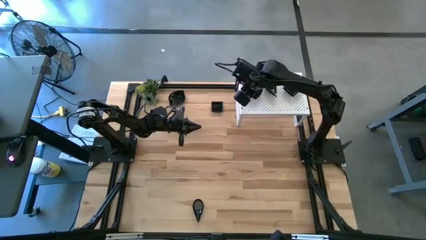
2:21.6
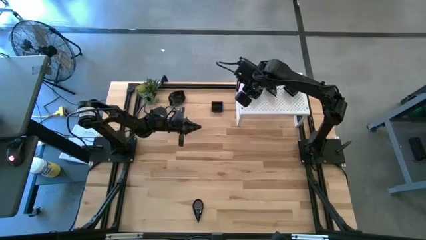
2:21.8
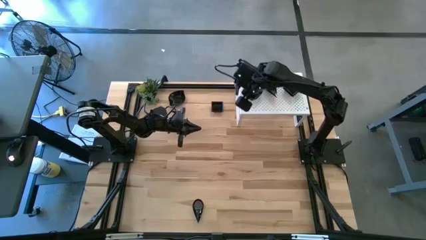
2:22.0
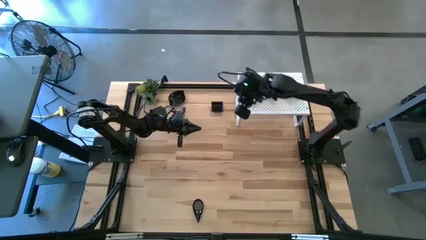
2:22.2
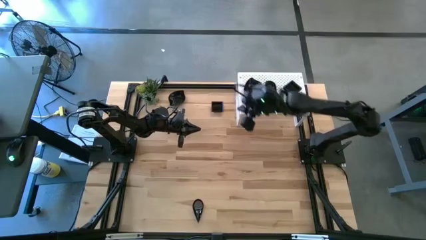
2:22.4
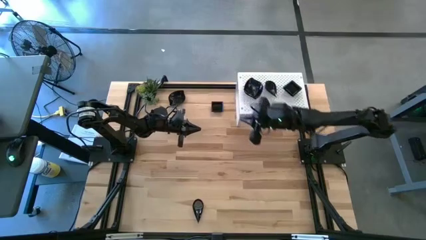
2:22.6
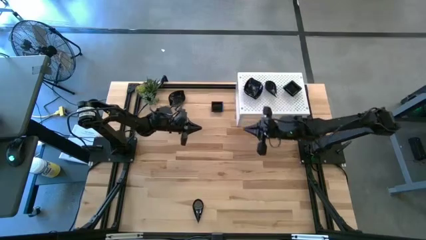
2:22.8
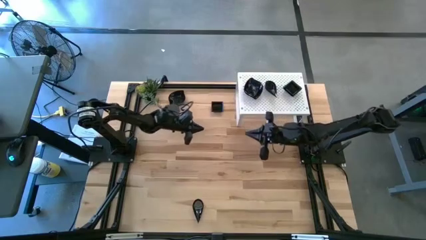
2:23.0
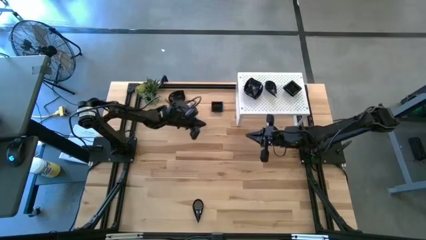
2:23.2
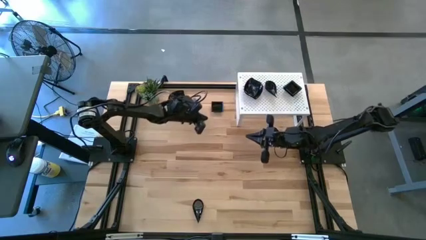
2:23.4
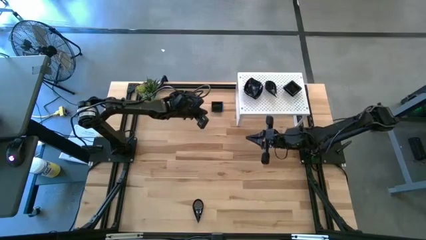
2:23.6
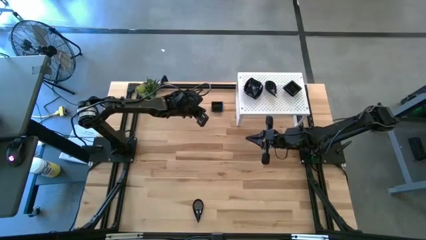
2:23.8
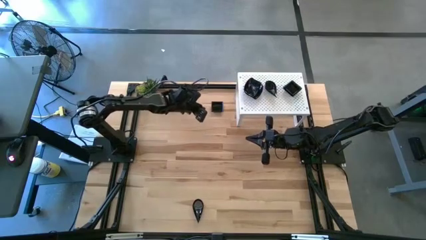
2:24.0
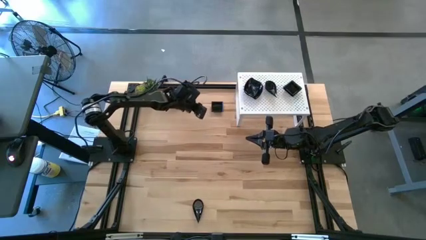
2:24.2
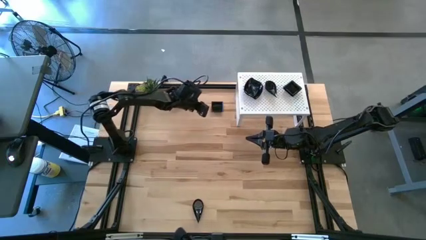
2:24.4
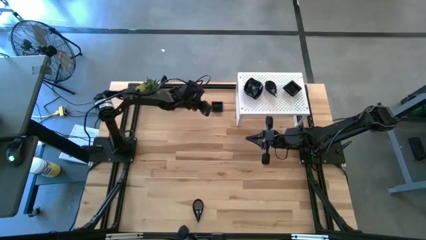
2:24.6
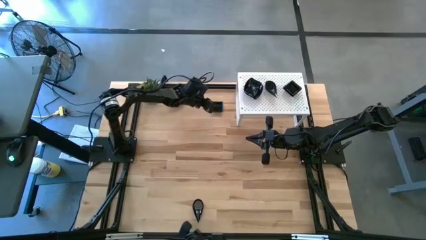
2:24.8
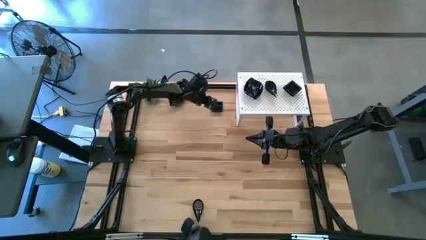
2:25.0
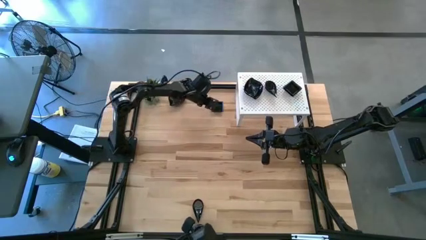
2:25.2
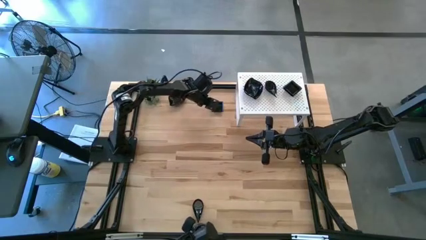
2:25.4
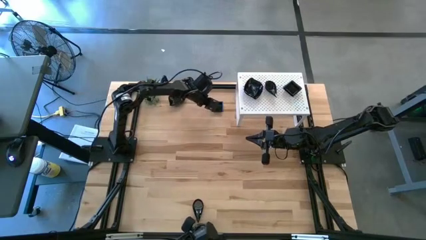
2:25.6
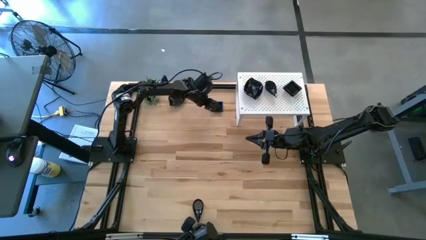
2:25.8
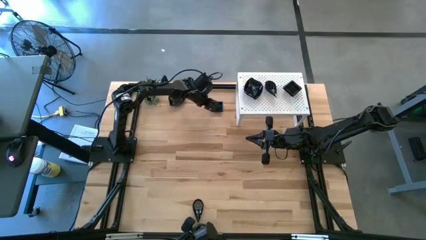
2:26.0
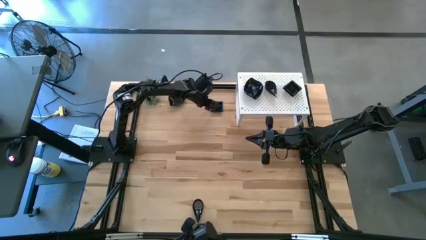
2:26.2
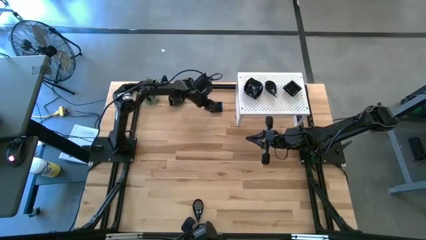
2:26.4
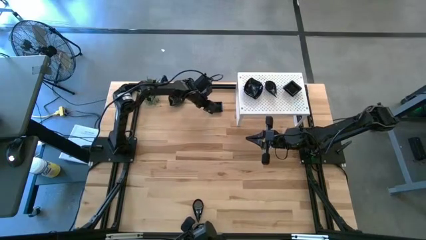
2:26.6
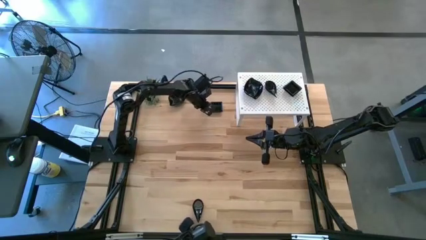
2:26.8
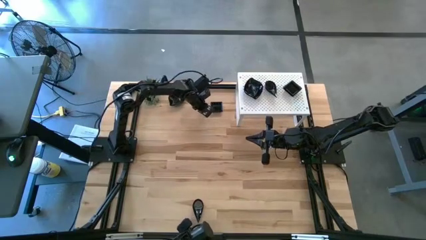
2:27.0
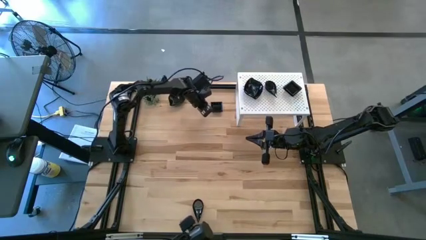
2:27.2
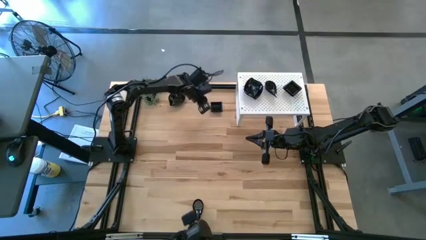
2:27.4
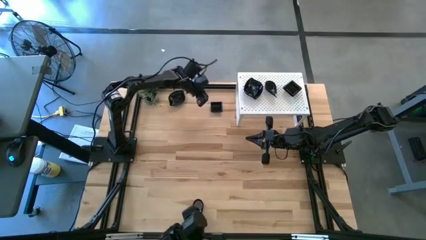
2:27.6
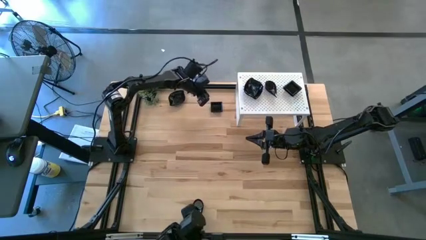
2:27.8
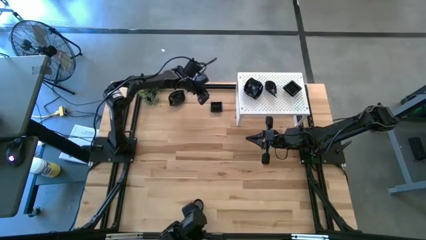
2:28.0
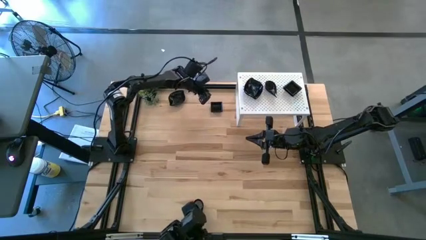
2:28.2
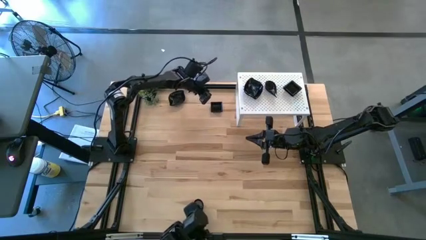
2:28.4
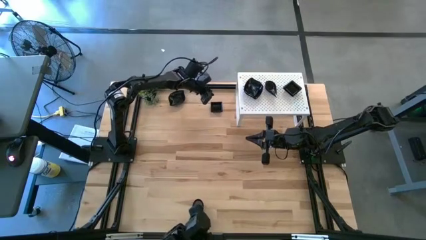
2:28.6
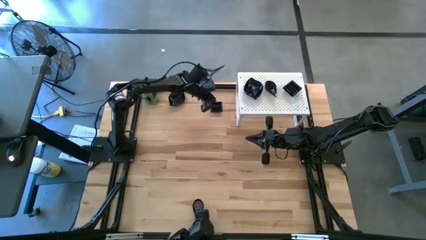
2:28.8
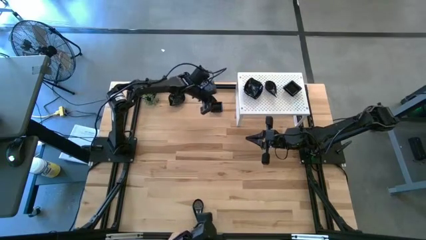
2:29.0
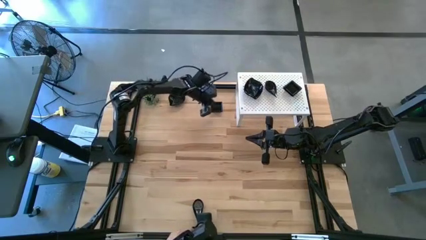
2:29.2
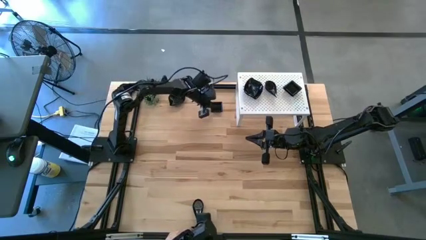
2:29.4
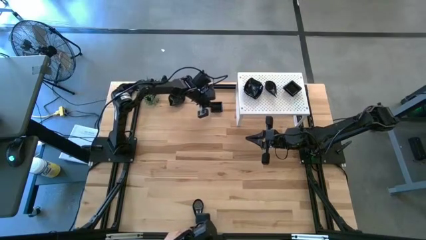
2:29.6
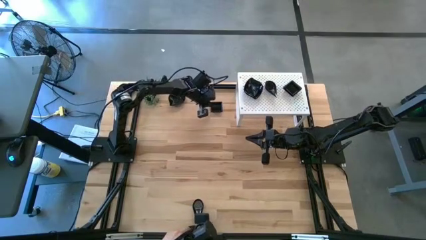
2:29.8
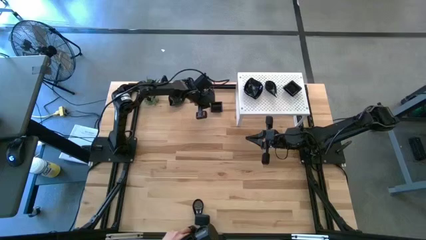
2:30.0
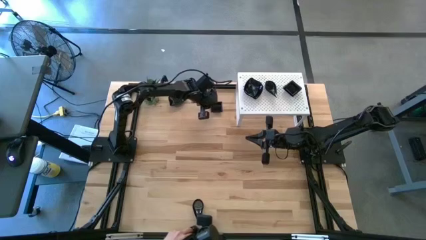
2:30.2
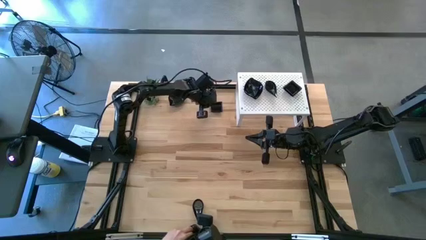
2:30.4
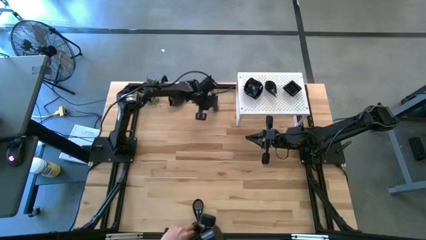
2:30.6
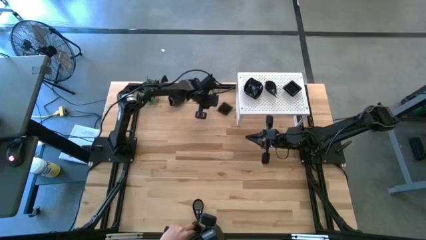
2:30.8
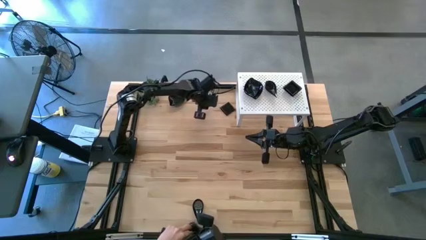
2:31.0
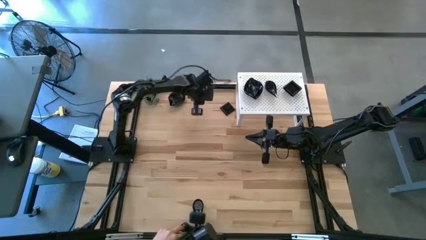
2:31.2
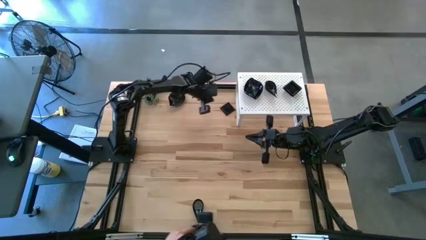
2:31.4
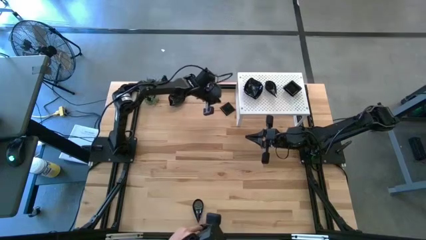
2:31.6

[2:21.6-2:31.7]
Task: Pick & Place Mini shaped plates
Stack the black square plate on top of the black square plates on the shelf

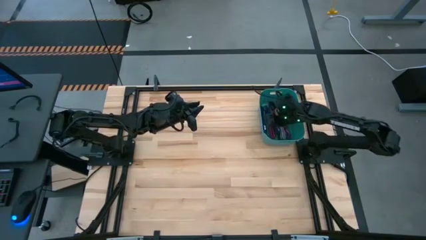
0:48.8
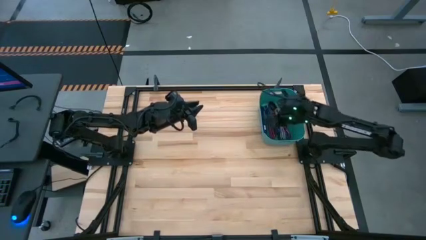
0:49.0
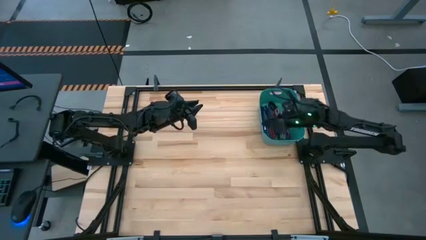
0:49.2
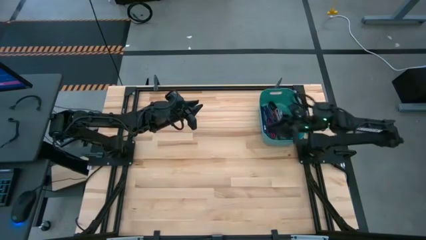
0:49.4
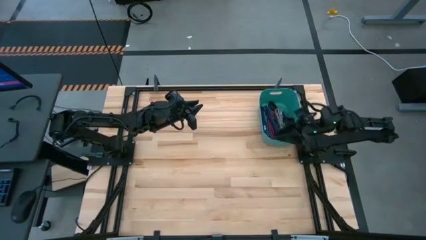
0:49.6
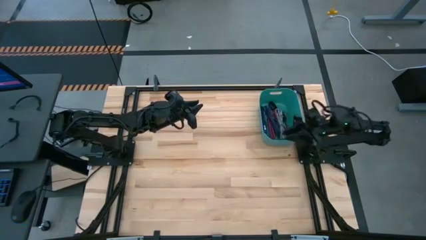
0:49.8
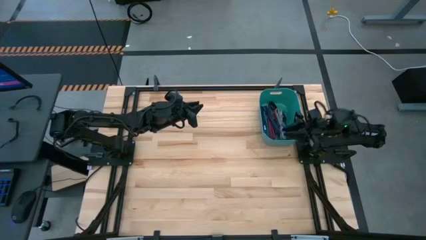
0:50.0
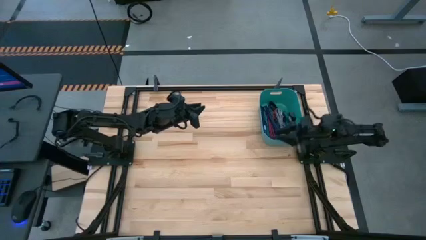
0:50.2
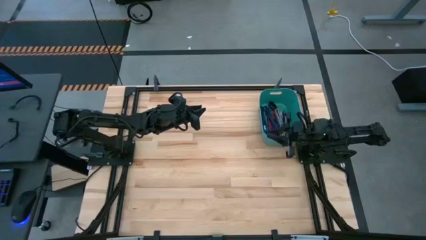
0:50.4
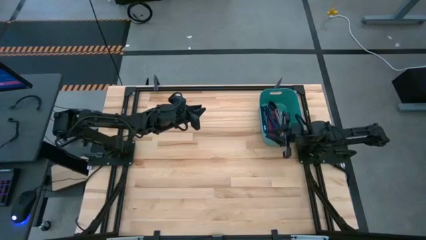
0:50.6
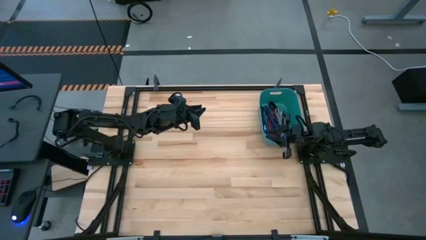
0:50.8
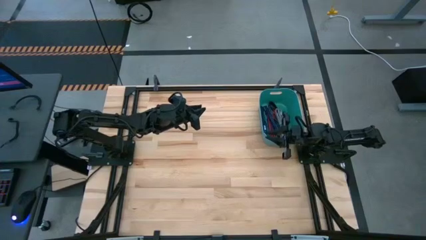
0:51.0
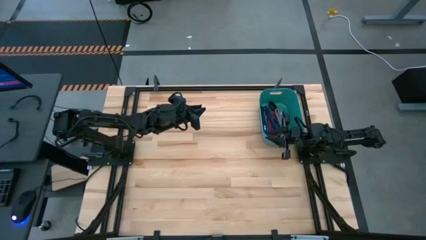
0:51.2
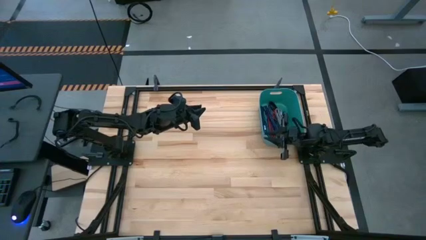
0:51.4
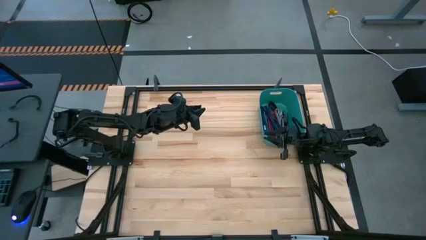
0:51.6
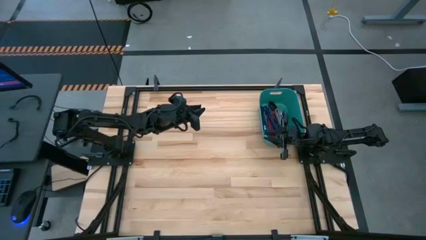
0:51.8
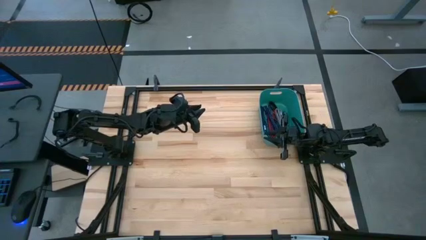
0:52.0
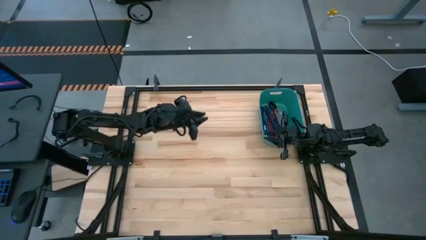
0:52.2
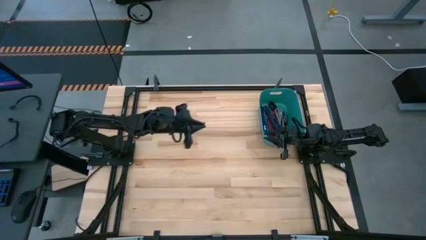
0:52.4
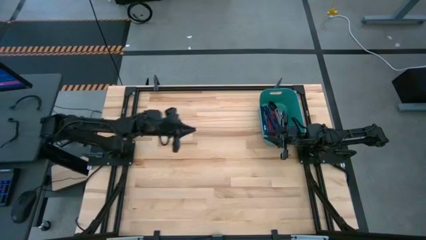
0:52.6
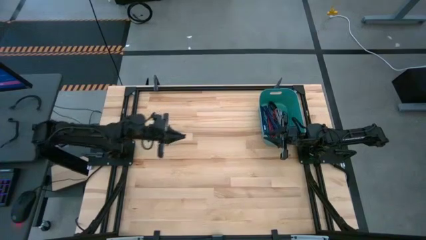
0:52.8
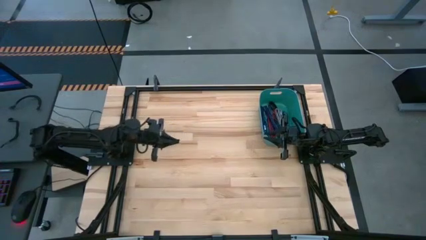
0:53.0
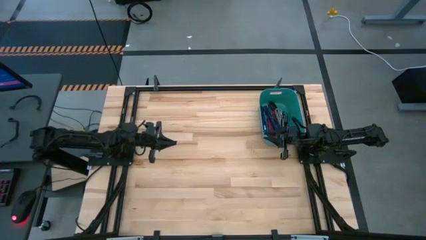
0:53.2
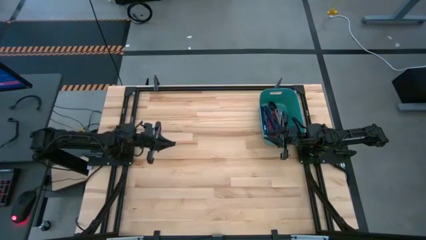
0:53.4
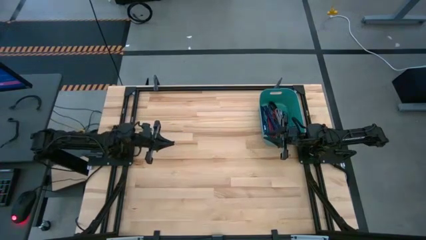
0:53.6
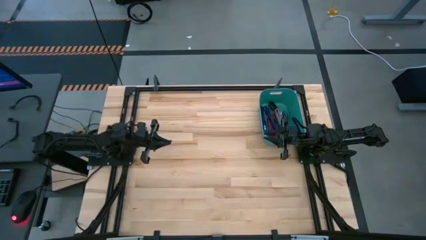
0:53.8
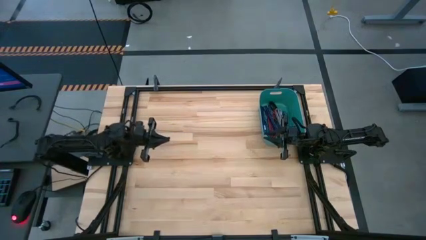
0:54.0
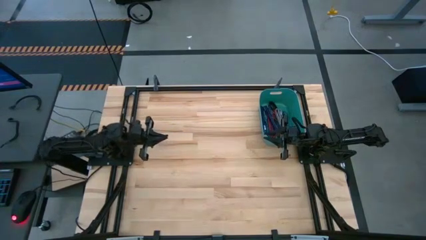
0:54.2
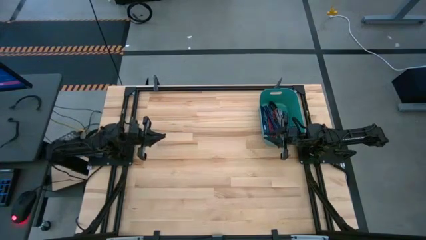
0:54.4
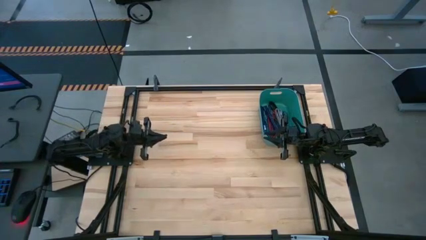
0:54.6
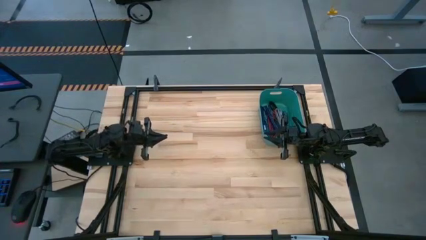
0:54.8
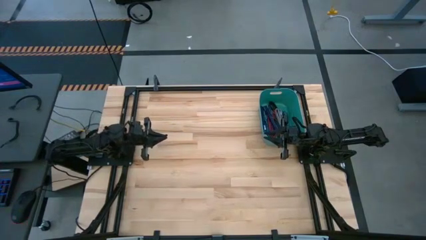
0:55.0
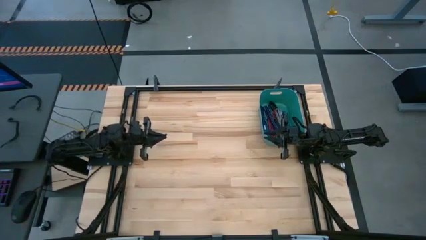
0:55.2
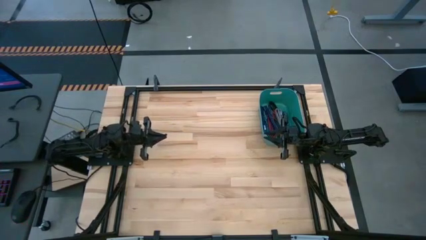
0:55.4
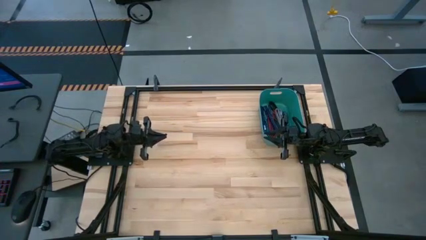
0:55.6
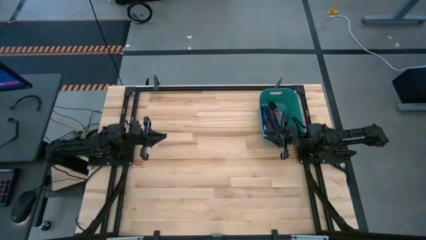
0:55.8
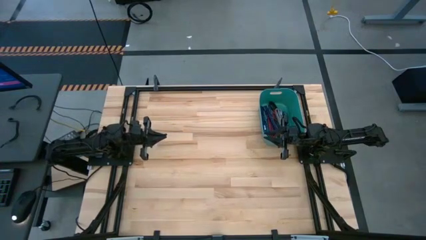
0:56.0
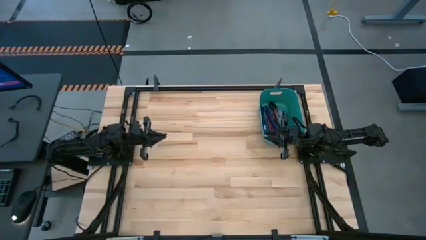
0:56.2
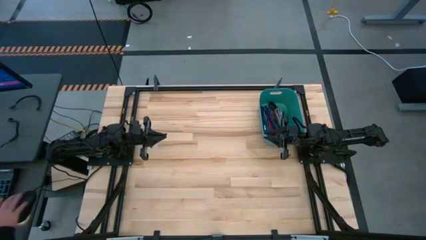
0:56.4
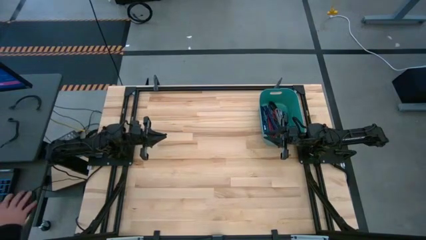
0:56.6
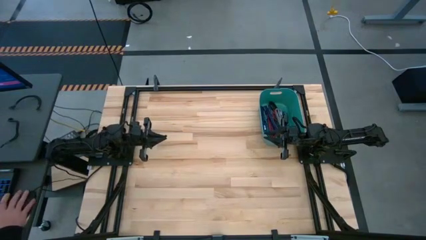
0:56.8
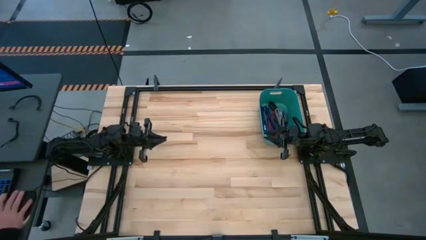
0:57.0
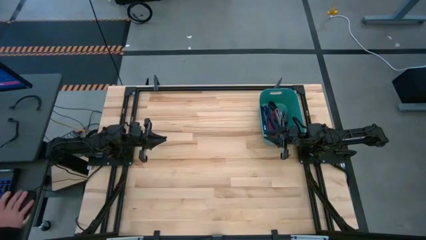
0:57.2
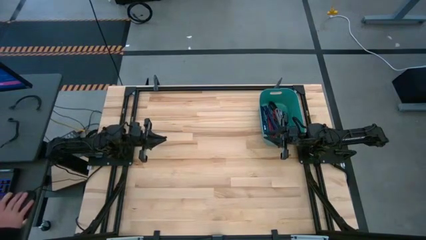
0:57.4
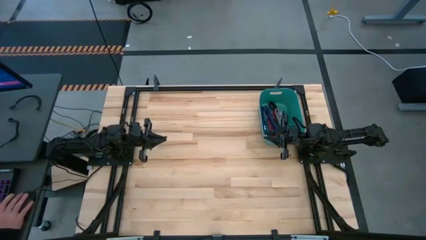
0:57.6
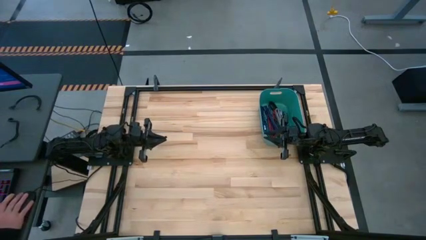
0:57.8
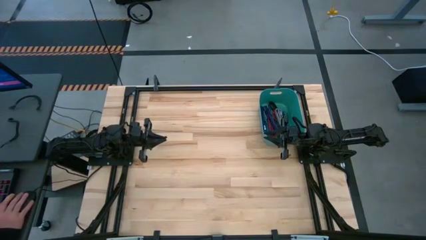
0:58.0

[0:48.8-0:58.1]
Task: Pick and place USB-C Cables
Return to Home Position
